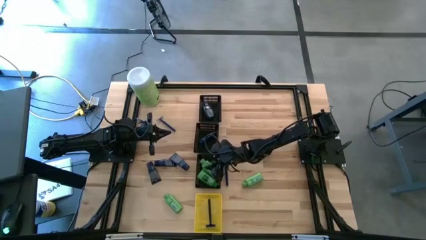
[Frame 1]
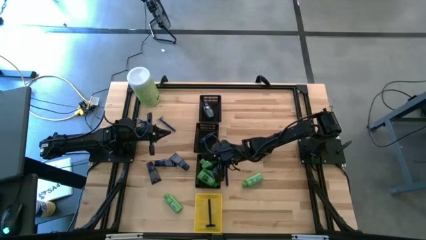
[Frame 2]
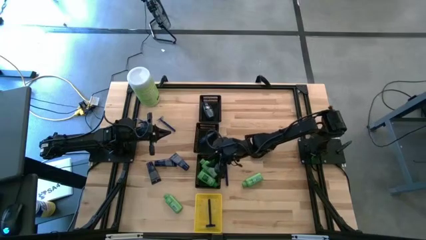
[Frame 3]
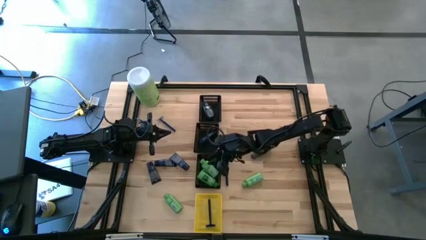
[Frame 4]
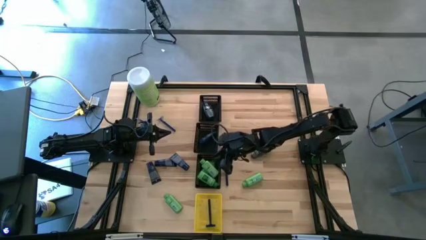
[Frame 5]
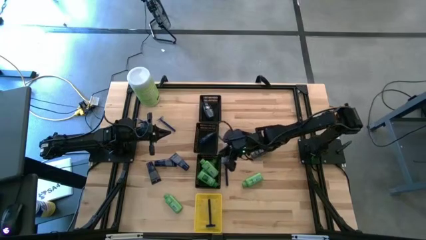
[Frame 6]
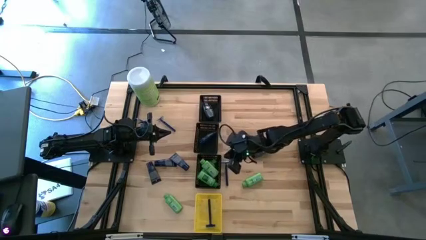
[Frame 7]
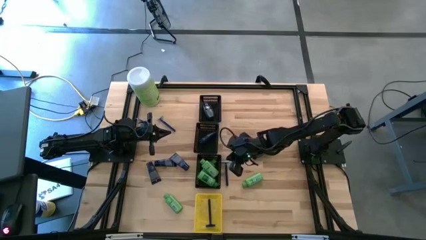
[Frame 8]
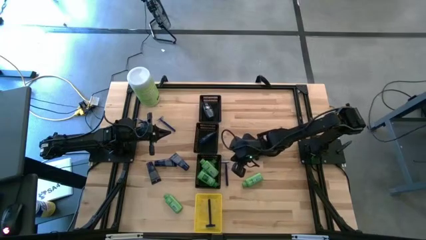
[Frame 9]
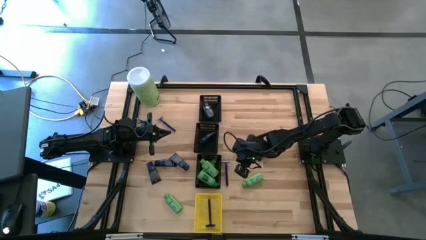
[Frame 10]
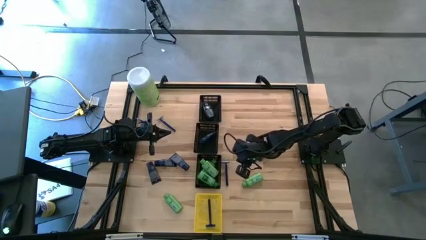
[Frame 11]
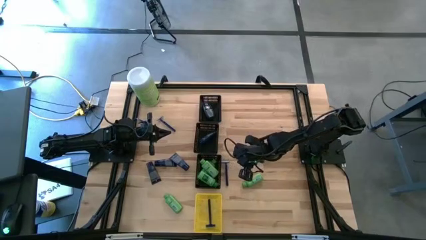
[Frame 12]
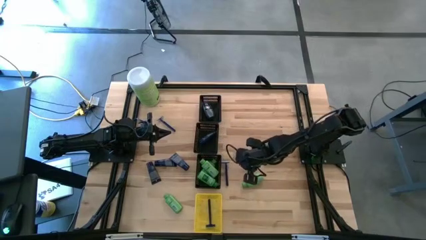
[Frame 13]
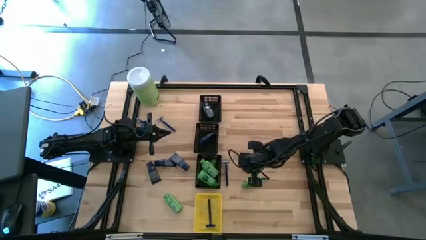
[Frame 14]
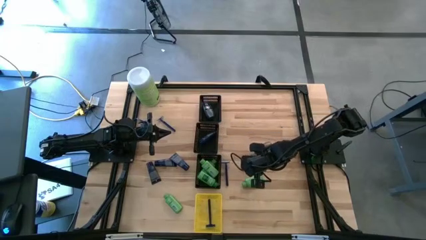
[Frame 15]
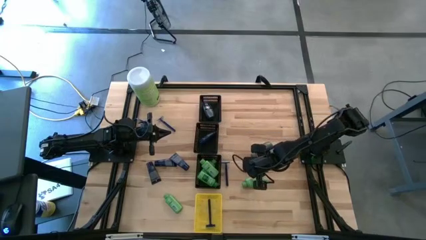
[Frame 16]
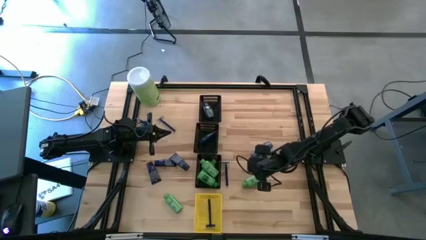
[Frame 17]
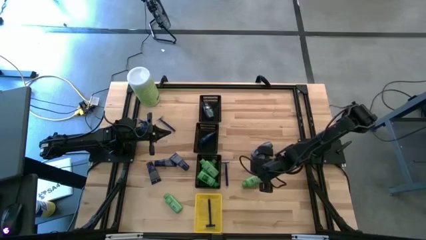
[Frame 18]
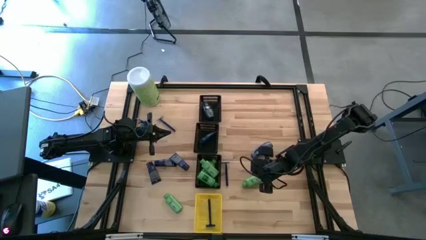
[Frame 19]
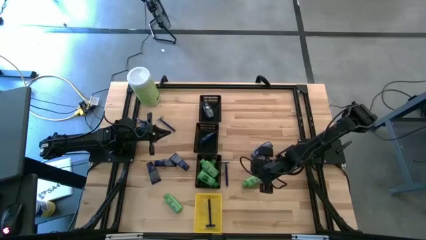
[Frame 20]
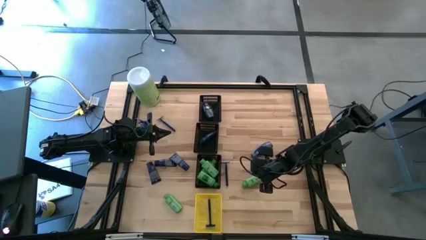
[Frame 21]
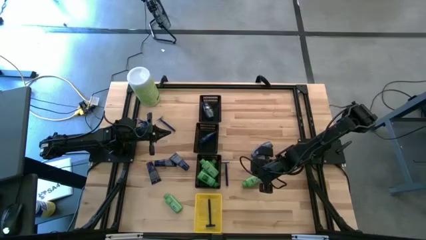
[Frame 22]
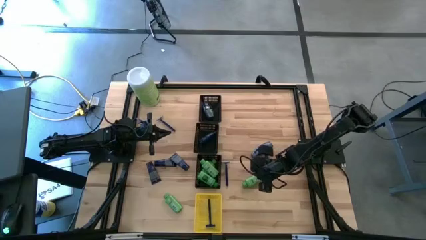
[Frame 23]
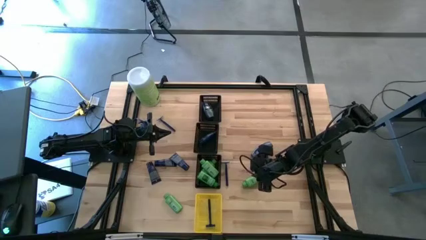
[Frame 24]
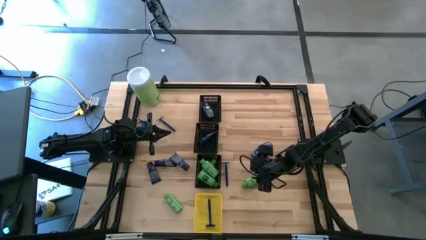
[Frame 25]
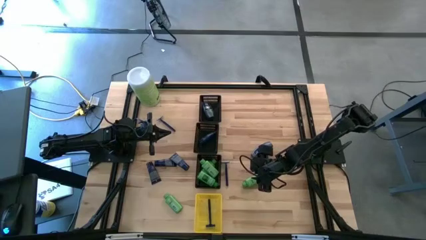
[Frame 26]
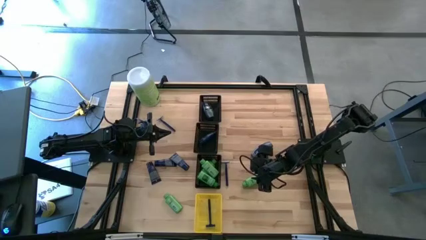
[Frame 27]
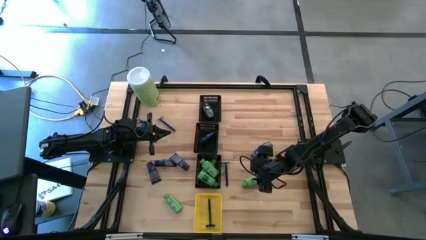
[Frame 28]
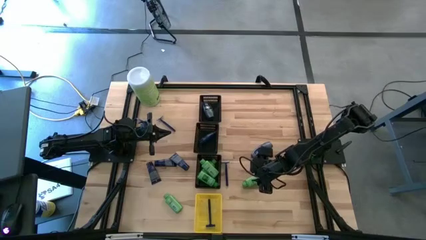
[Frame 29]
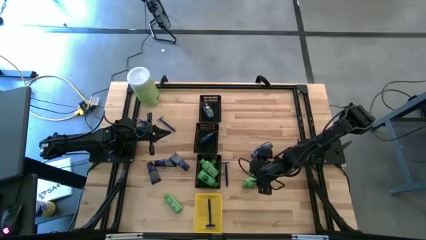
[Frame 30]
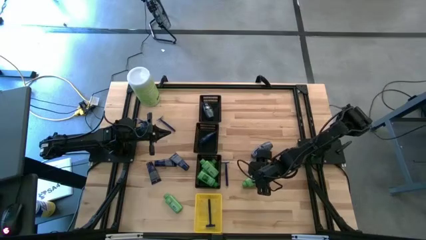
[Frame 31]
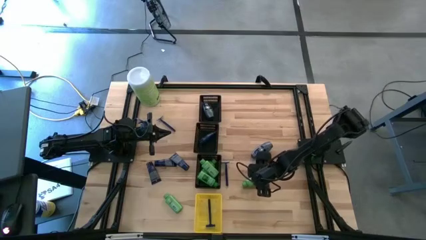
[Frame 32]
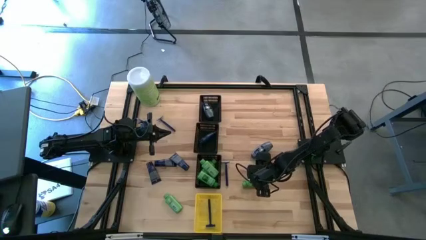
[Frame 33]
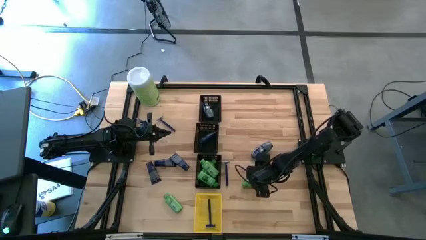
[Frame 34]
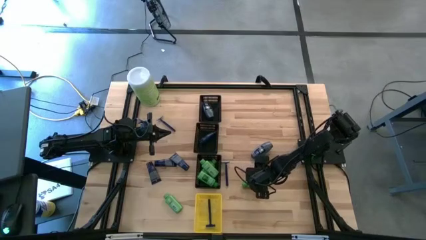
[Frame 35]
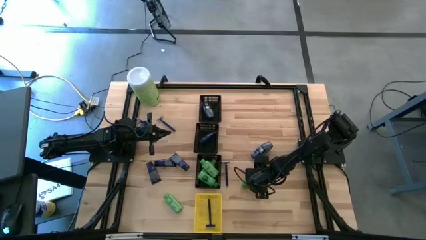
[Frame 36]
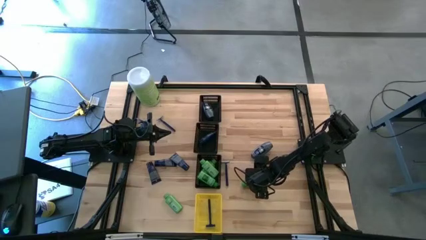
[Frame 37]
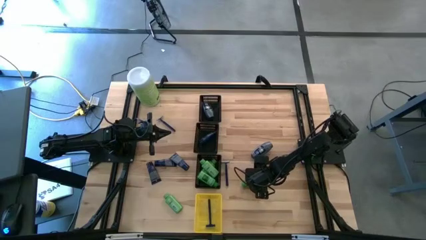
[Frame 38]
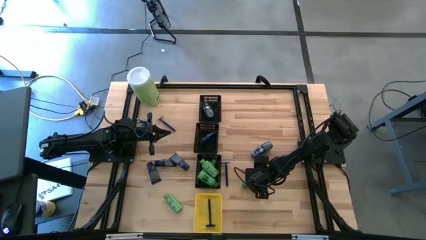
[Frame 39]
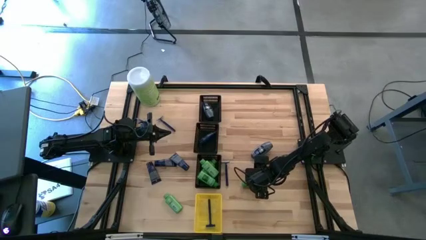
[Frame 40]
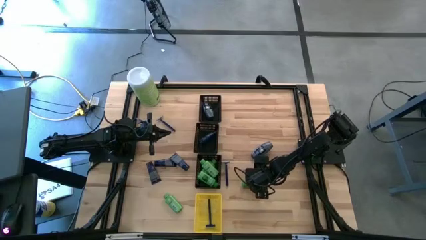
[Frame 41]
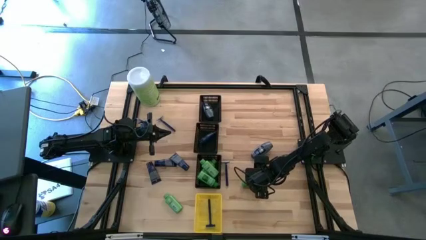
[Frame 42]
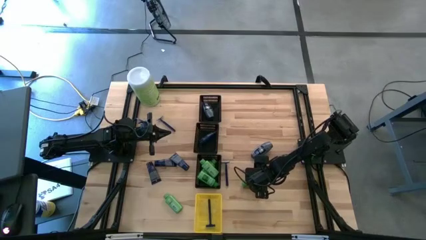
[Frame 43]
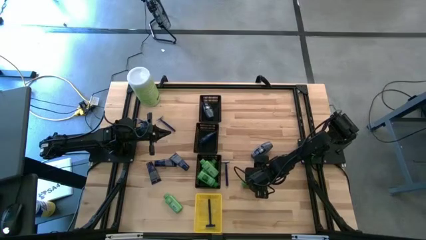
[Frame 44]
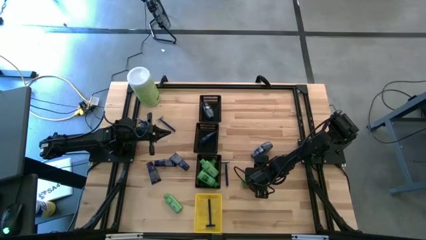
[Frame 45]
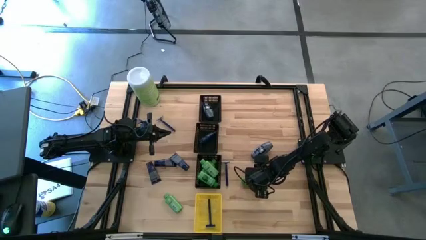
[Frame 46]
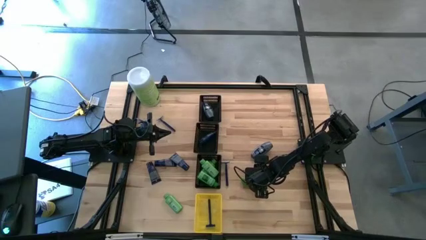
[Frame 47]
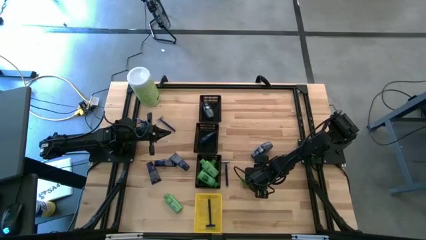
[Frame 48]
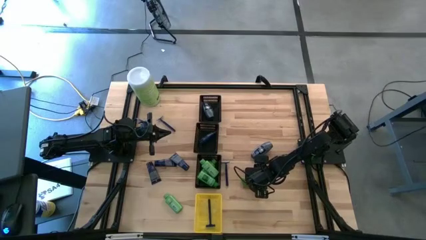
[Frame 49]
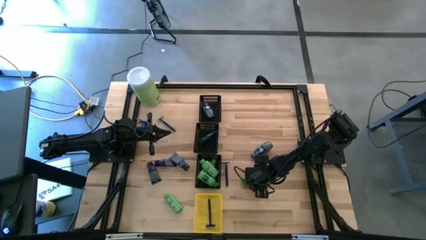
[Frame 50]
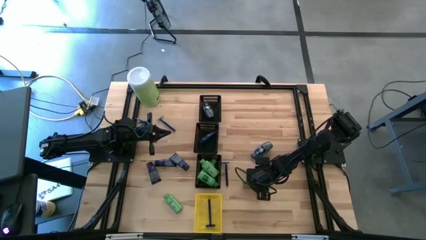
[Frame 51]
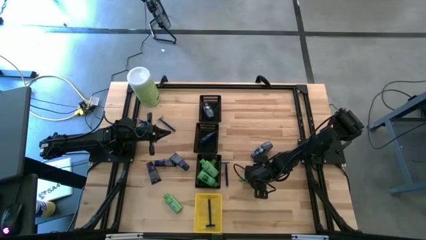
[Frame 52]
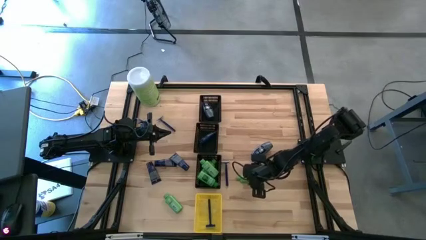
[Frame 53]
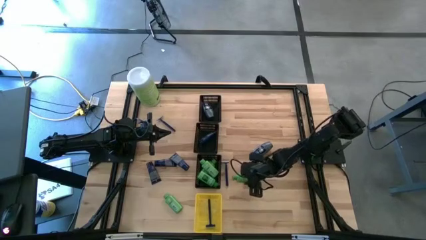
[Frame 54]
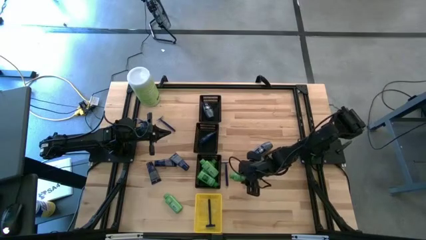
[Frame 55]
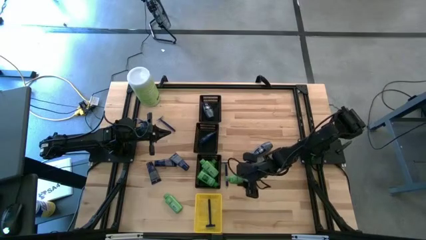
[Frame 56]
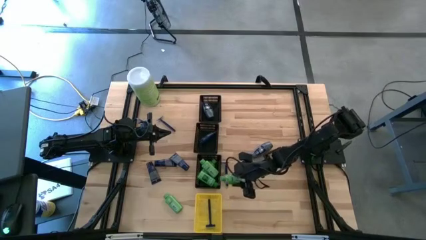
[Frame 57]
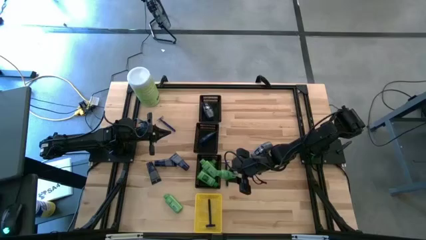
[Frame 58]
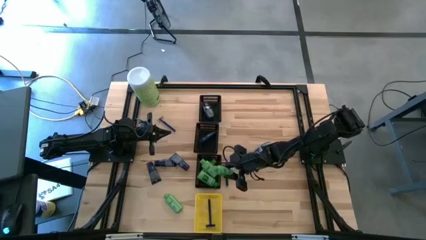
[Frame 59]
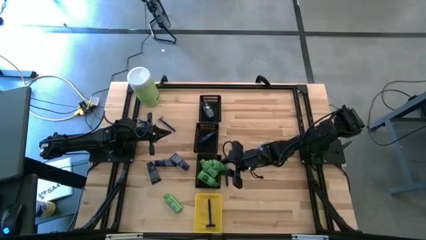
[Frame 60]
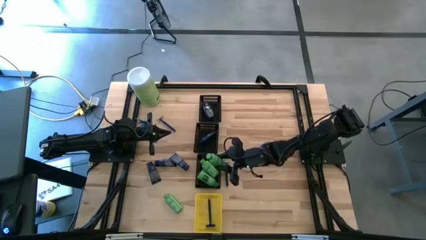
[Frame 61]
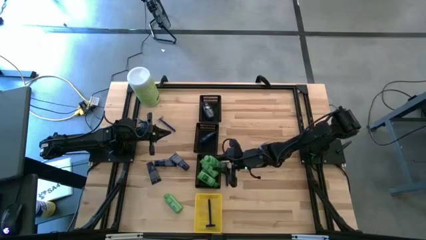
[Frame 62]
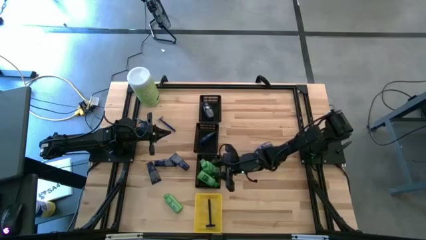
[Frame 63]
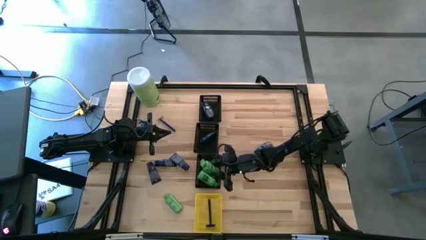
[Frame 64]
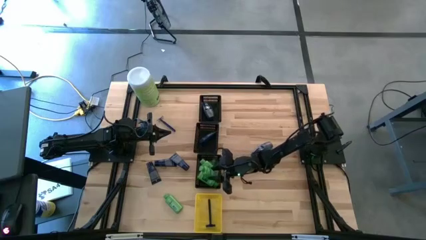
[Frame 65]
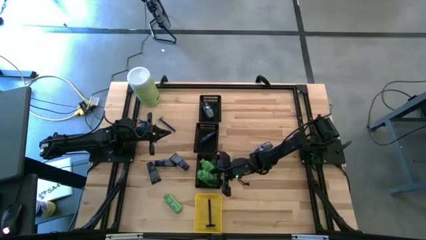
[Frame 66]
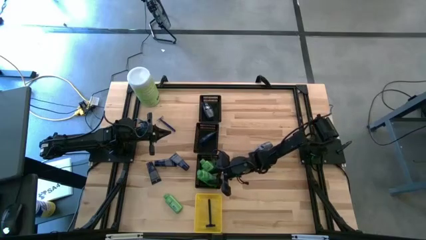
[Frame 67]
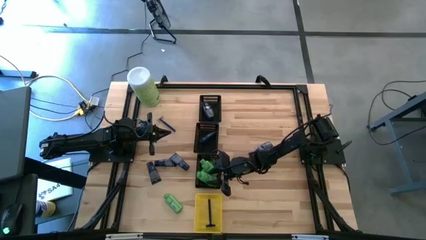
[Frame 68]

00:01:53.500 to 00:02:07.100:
Task: Pick & Place Travel size toiletries
Put the green shampoo bottle into the bottom black bin

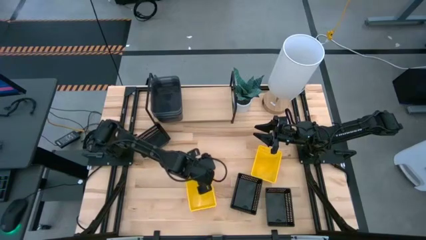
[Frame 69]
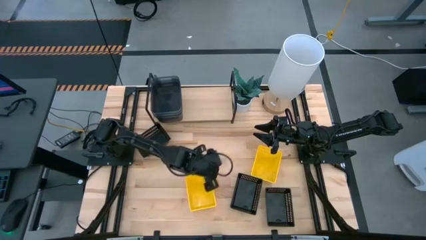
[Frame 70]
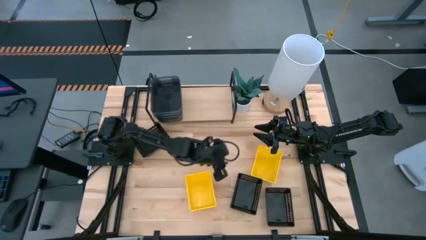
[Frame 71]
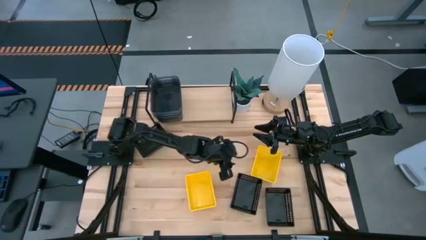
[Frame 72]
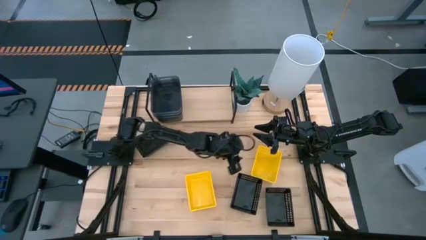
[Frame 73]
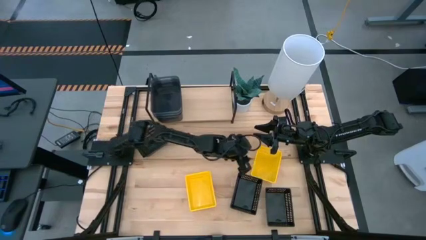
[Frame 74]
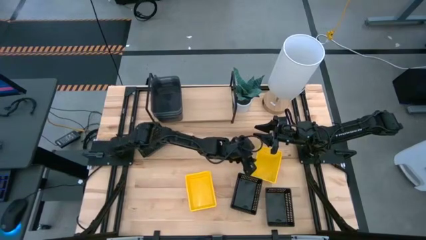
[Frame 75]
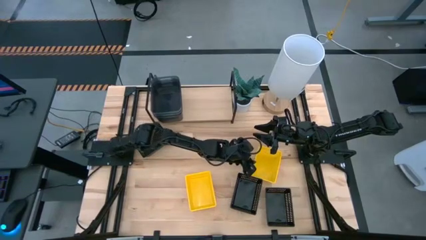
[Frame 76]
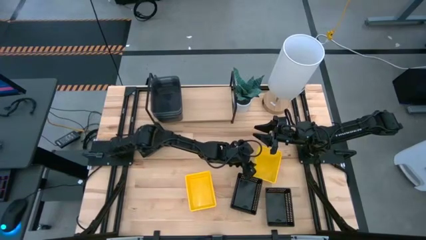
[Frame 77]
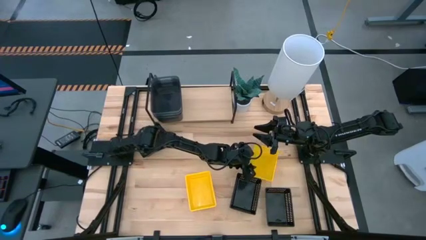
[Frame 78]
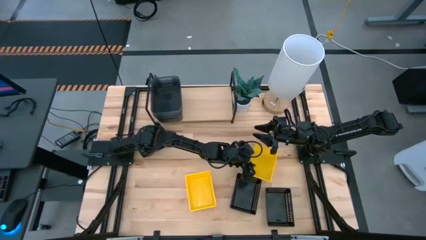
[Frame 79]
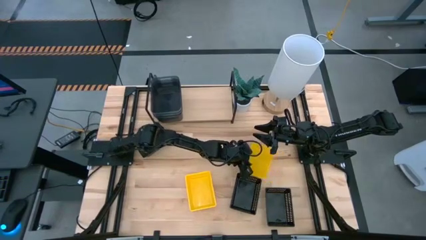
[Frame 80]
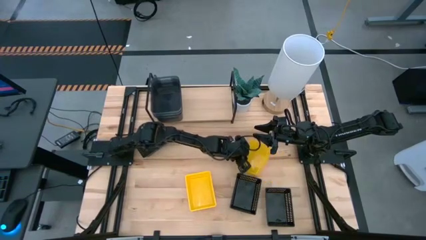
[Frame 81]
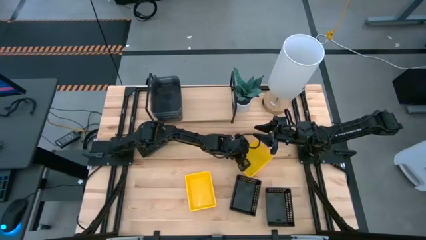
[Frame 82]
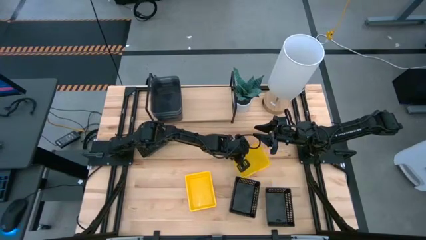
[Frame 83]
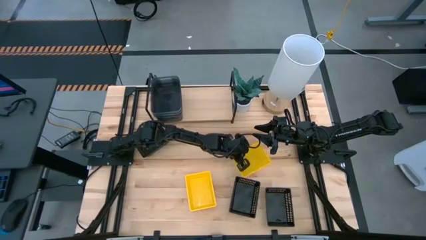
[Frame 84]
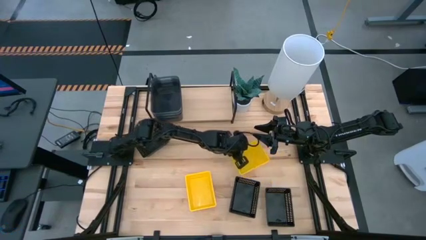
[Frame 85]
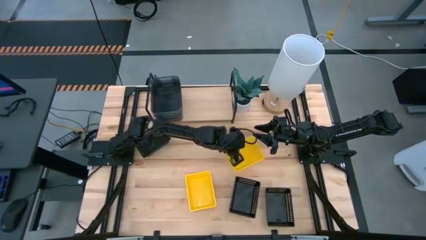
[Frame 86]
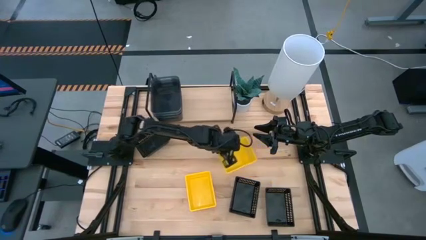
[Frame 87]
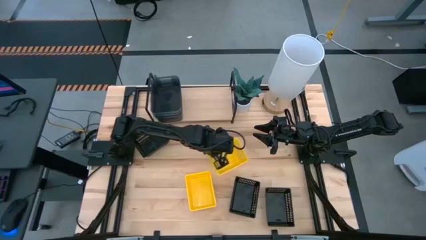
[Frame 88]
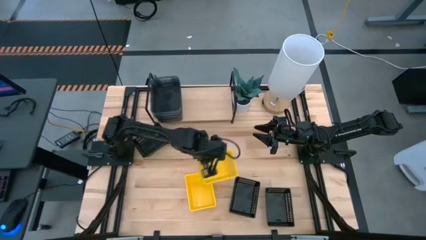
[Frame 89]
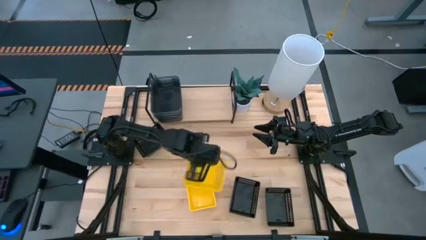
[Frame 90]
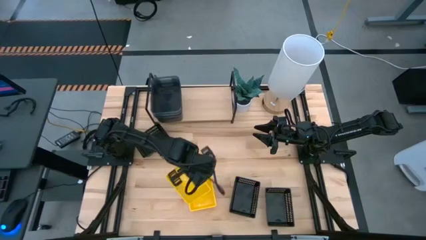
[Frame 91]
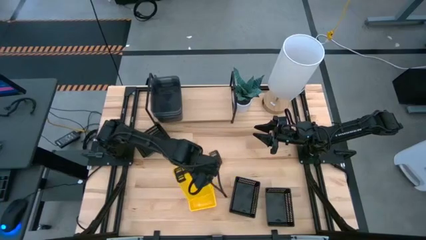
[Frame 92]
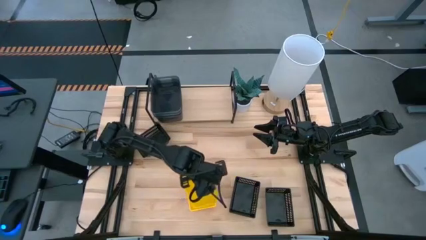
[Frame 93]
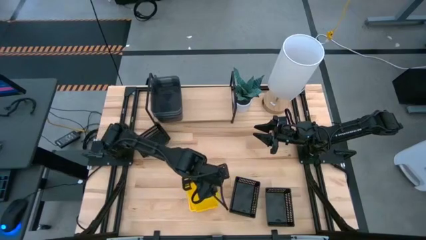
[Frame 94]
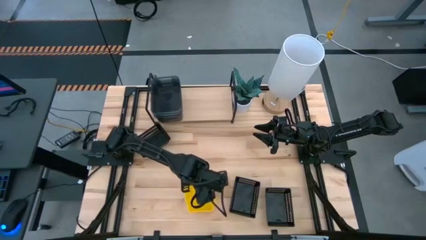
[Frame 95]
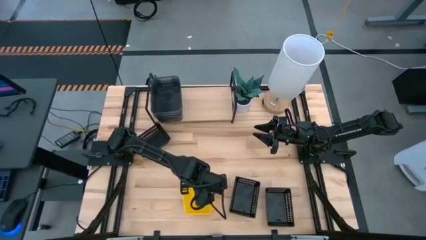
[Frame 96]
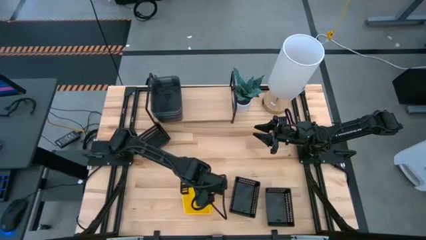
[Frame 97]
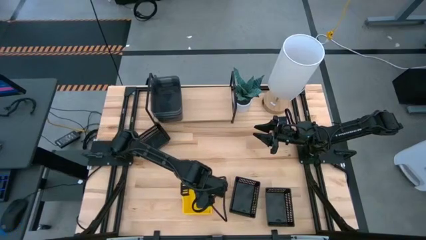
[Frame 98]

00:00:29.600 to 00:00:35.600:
Task: Stack baskets on shelf by color
Stack the right yellow bin on top of the yellow stacked bins
